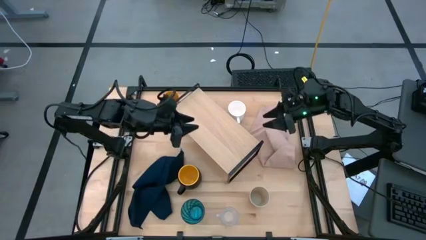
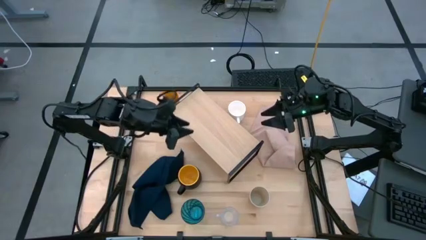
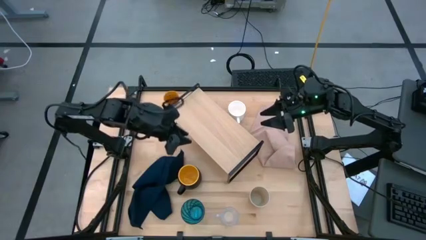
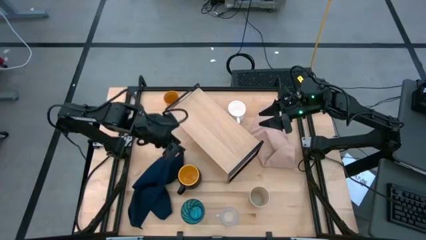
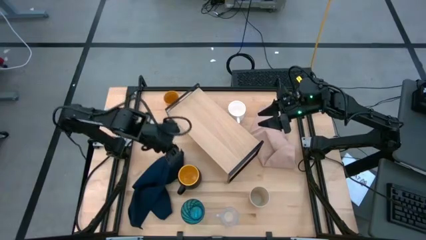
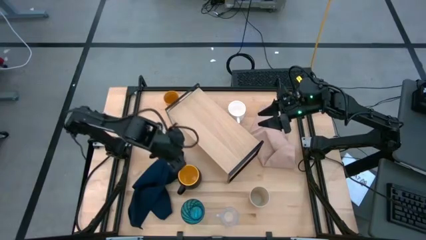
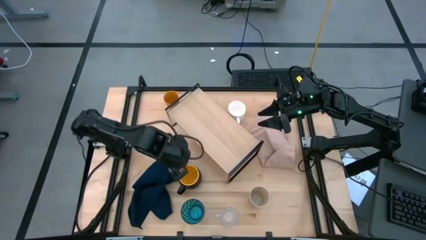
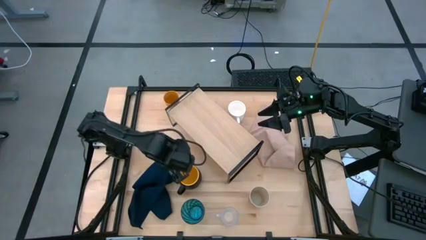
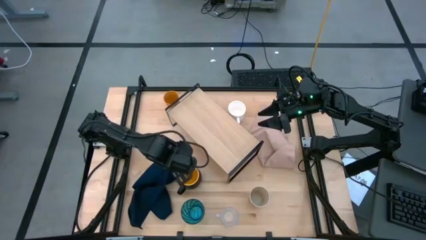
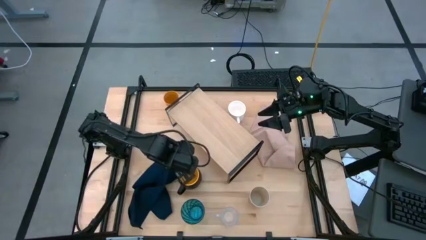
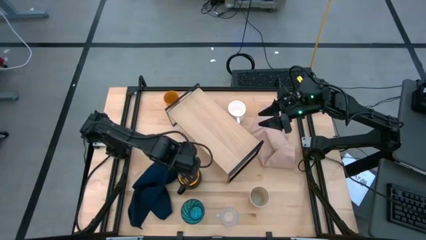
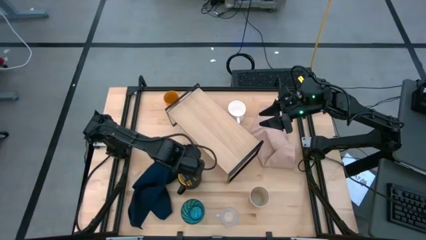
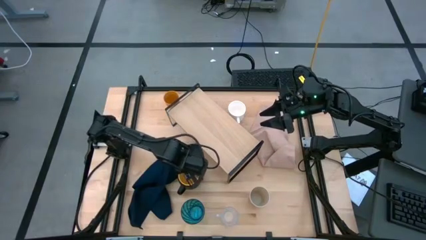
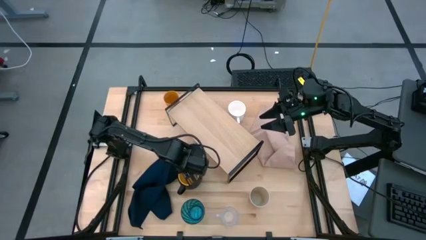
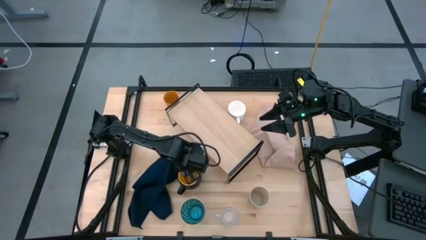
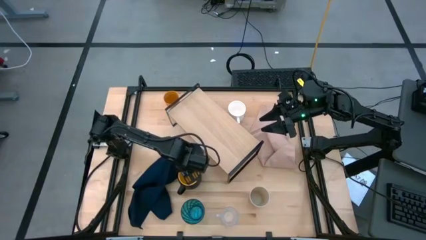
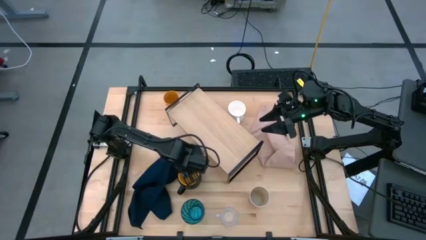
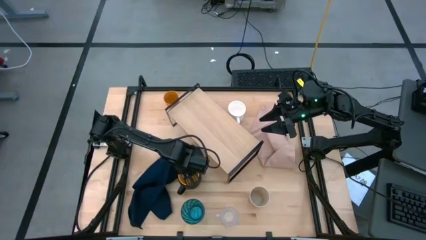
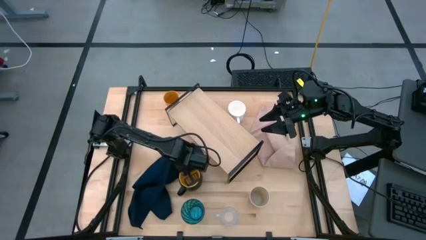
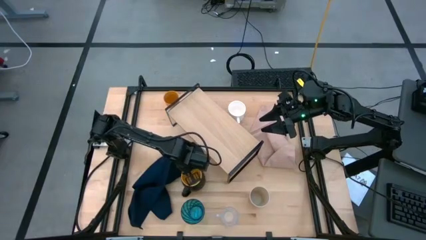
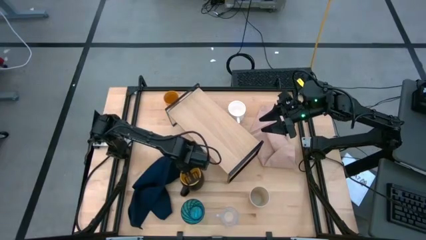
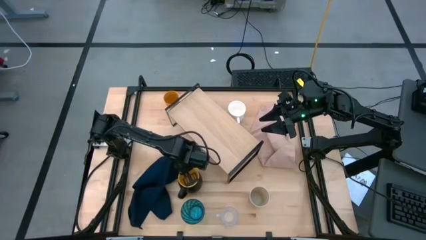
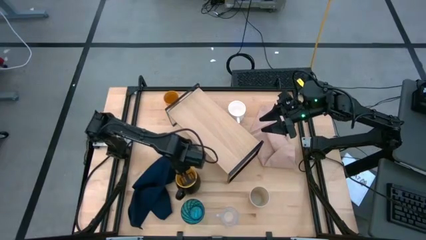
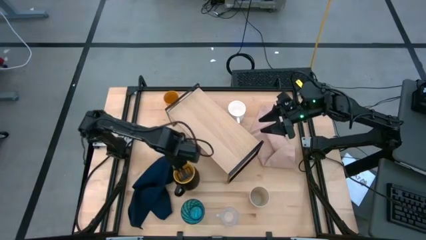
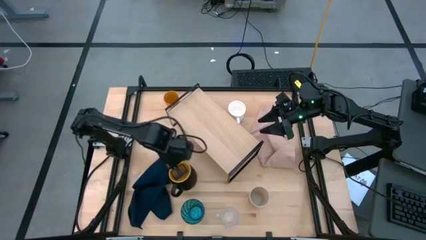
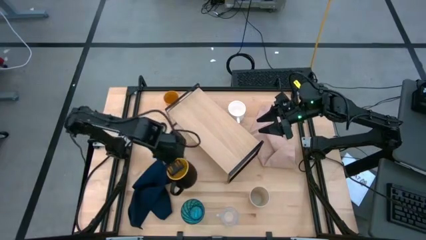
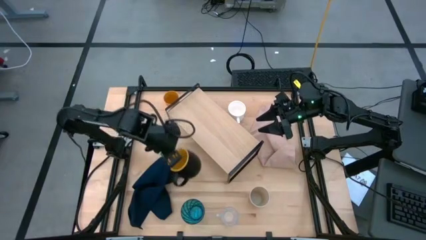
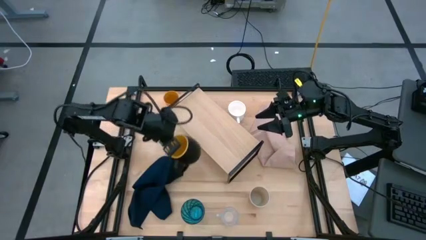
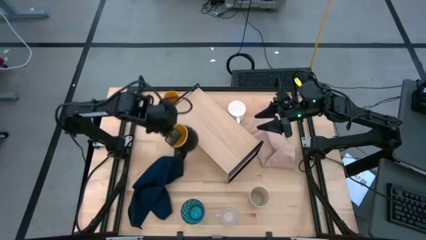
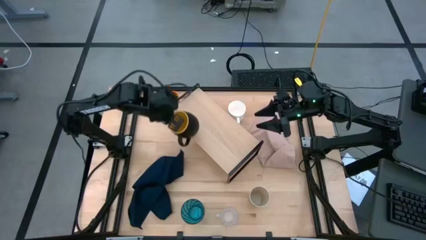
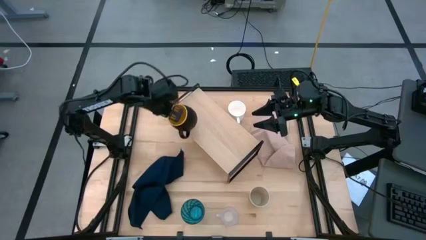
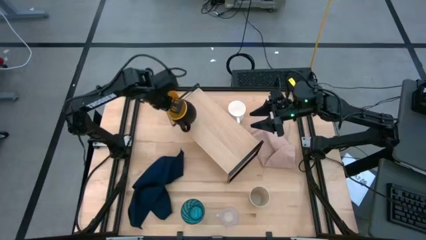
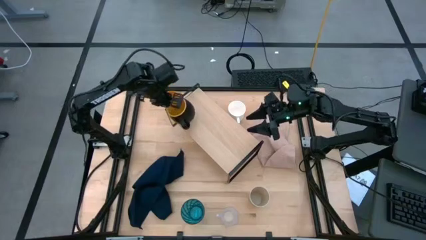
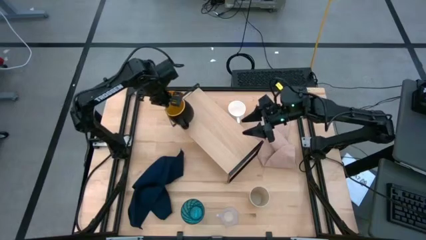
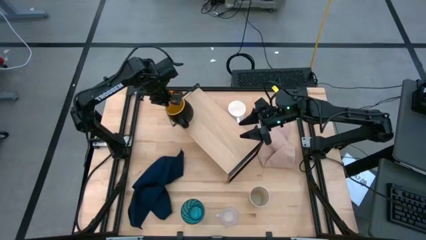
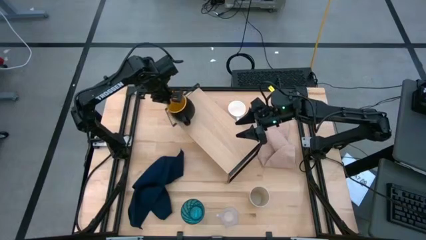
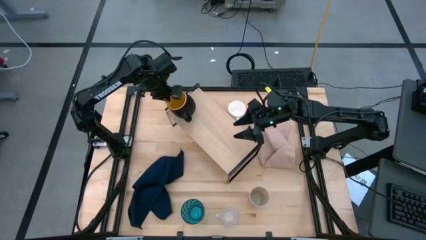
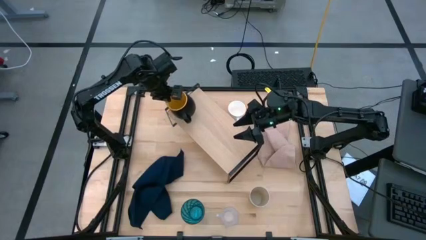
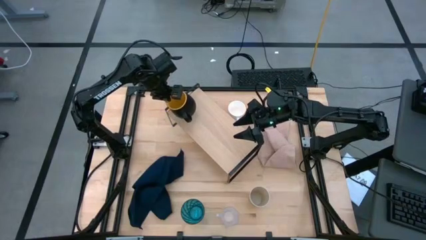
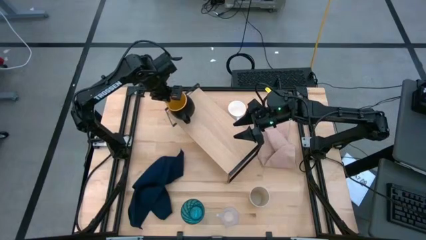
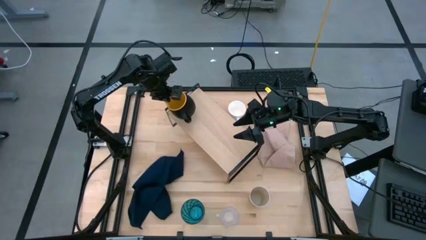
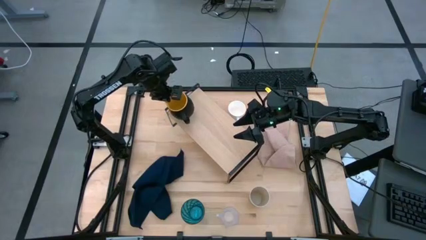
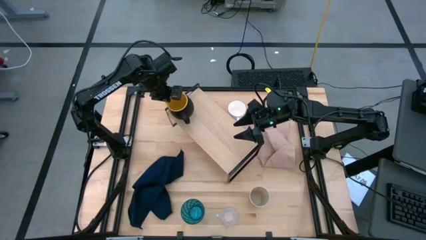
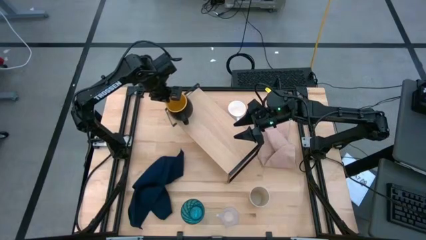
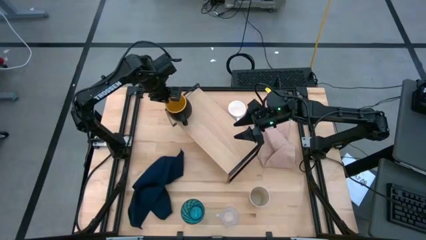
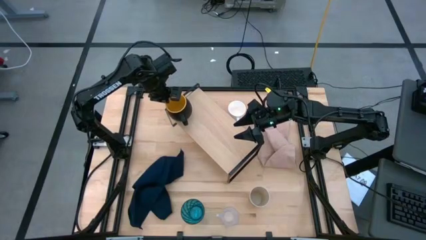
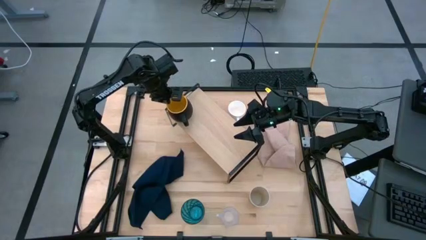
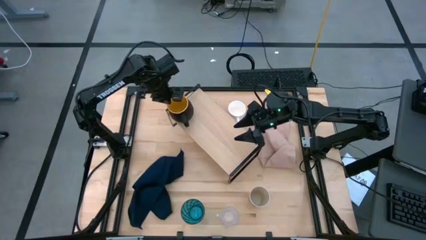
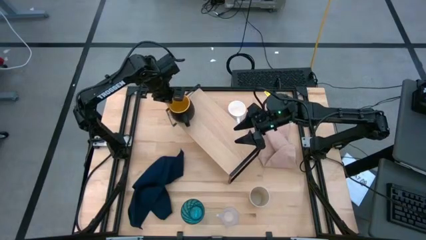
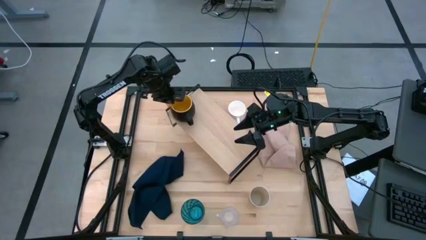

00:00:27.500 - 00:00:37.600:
Task: Stack small to large cups/mugs on shelf
Put the black mug on the shelf
